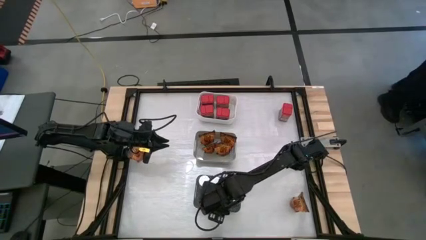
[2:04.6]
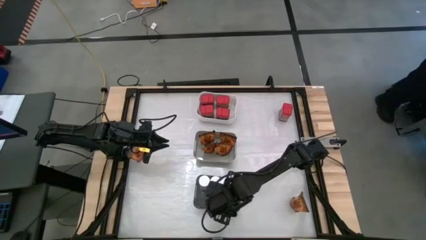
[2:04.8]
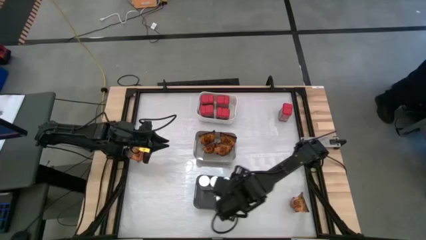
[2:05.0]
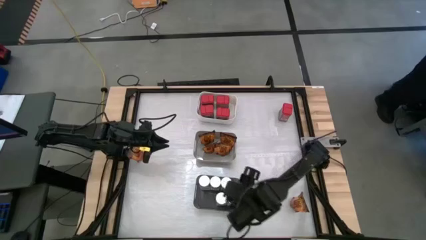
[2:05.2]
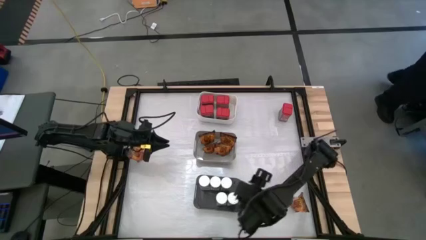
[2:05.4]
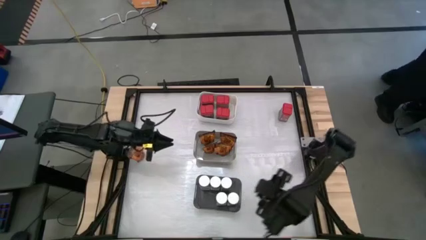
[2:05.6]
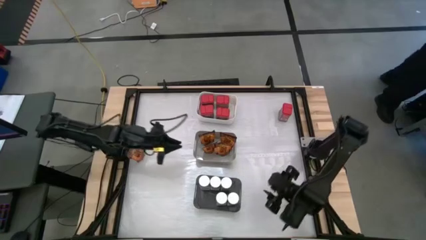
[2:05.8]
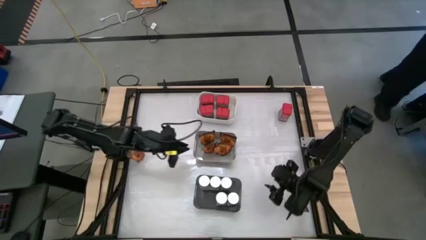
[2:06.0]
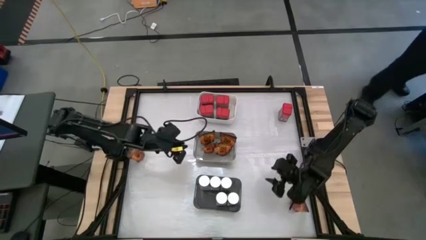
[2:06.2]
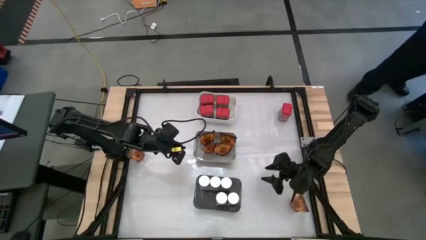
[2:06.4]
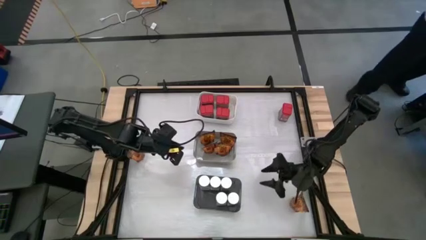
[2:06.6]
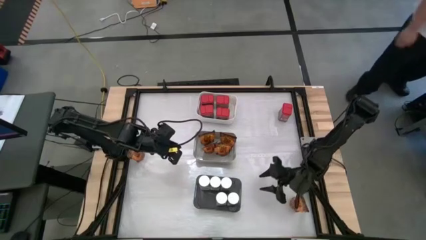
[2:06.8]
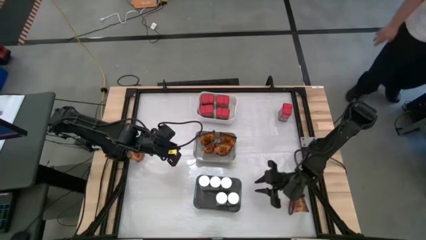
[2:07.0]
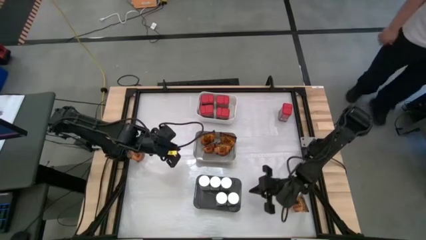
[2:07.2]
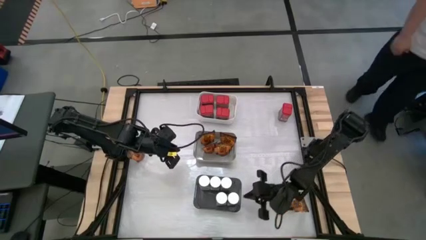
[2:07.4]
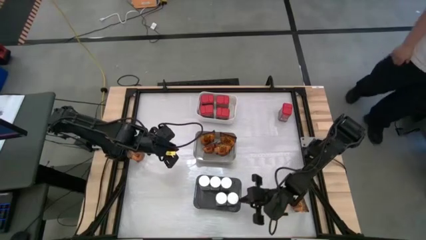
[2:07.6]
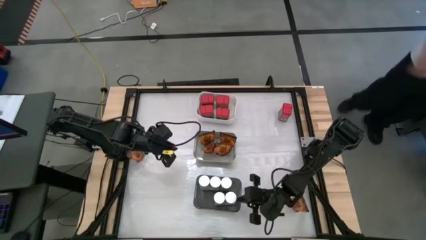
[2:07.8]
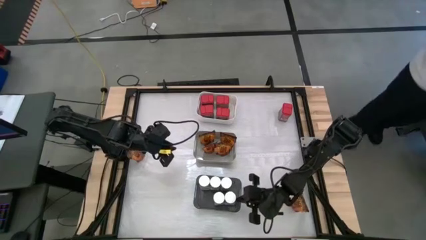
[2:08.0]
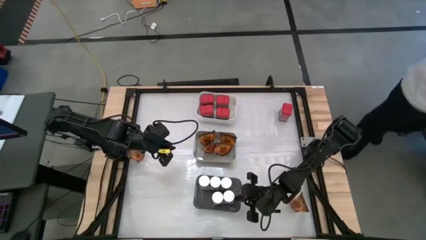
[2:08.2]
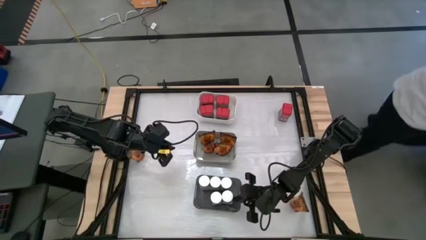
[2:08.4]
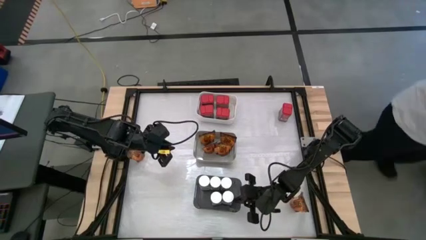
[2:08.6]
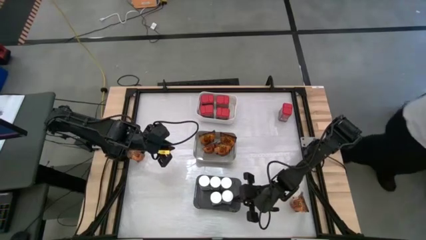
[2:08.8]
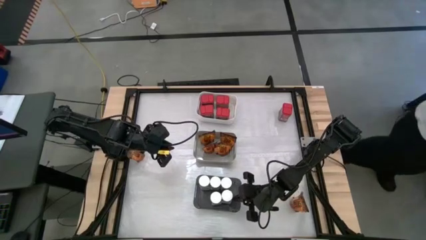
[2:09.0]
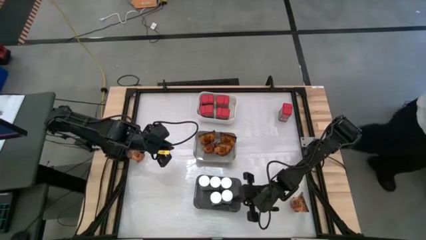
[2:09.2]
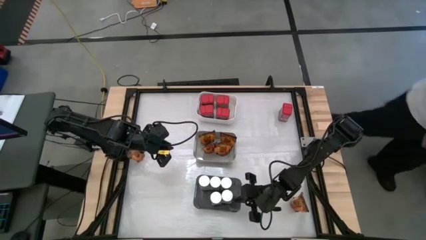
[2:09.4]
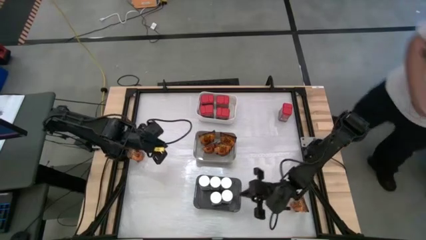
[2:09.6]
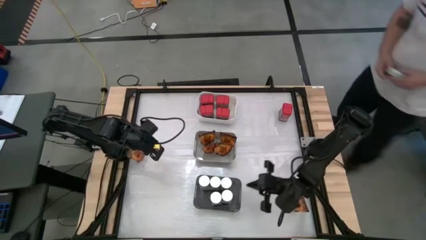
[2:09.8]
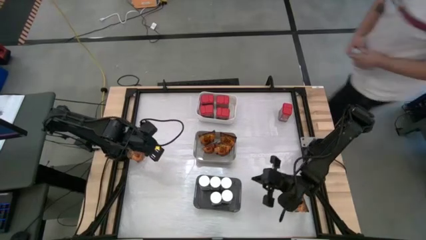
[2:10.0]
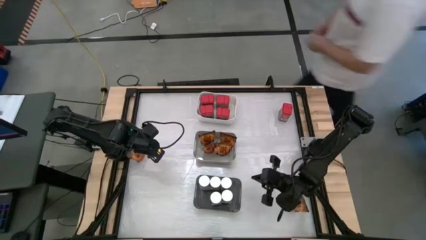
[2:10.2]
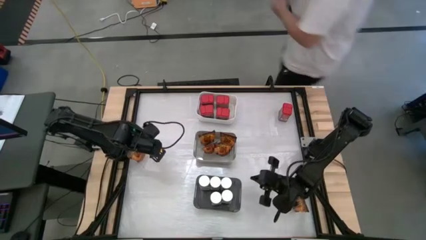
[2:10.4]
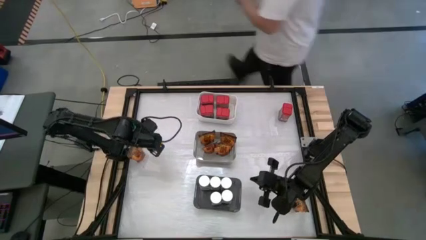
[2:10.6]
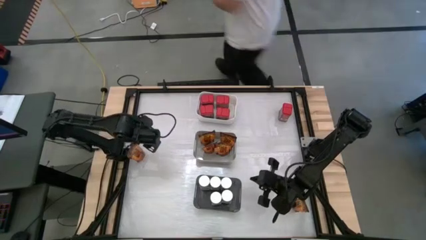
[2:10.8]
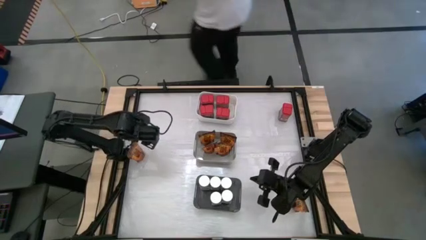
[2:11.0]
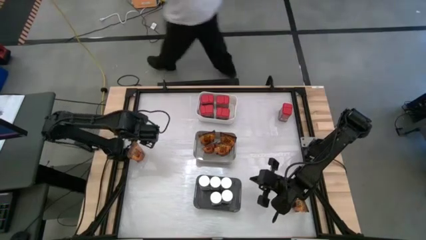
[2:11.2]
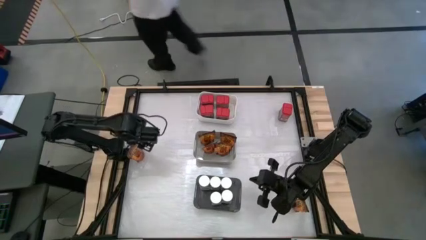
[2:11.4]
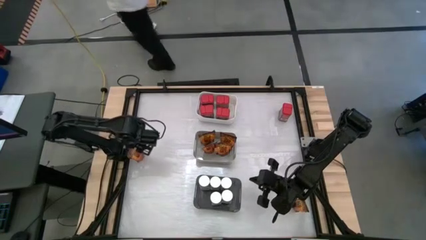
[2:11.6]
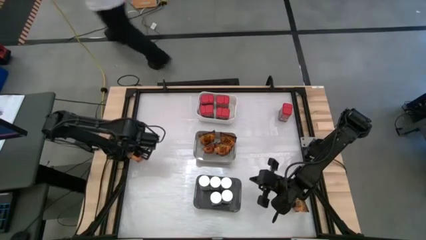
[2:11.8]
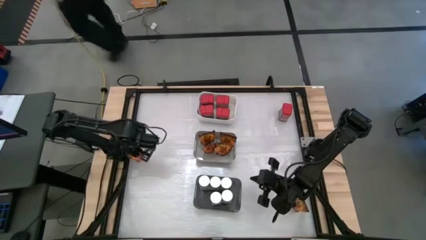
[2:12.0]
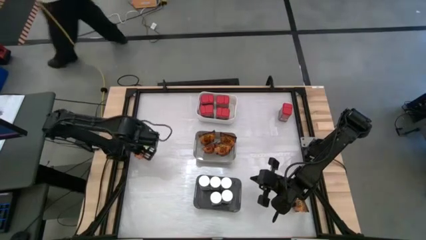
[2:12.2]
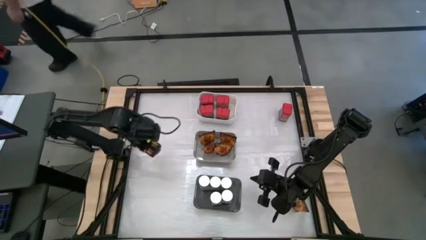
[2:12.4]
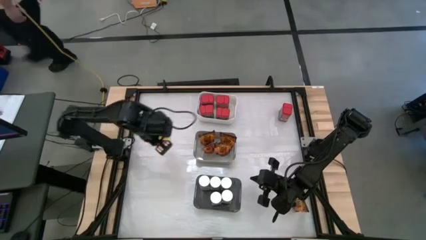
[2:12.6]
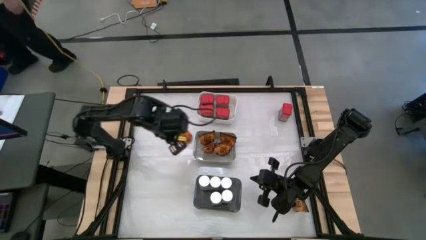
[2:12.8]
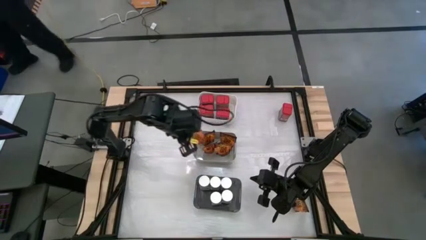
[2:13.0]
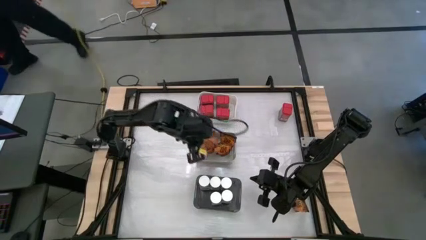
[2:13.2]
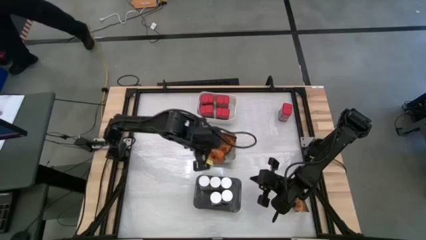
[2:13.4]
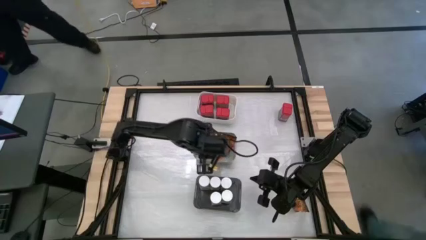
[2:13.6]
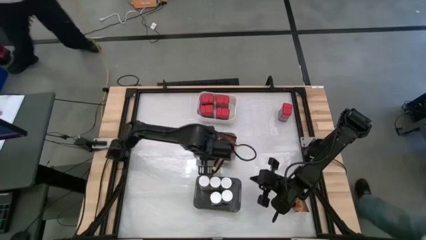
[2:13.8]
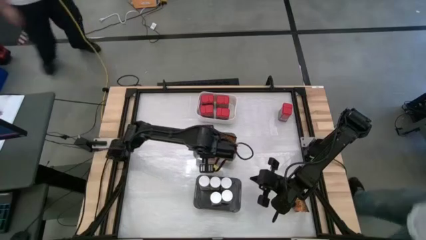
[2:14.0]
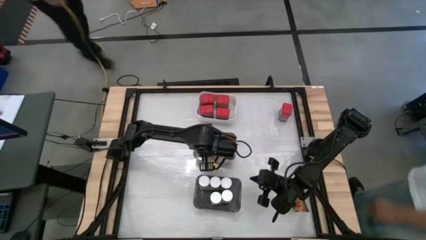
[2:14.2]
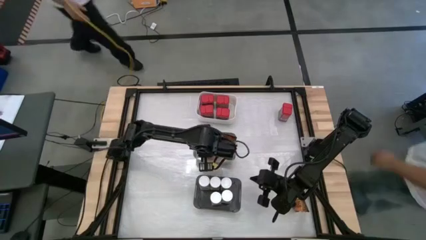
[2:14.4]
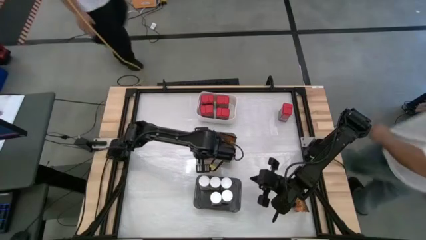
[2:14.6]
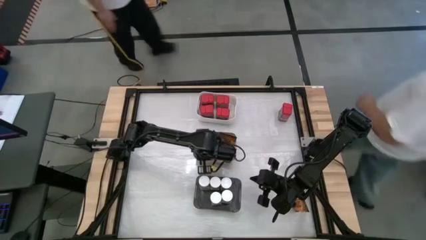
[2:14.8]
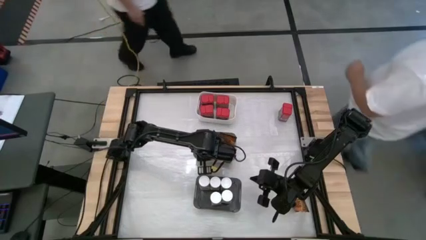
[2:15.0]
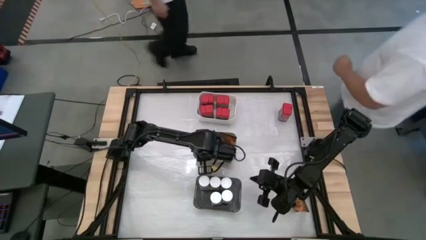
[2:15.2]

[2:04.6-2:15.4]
Task: Sort spices by type
Put the orange seasoning bag into the gray bin

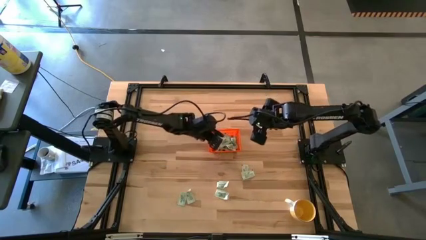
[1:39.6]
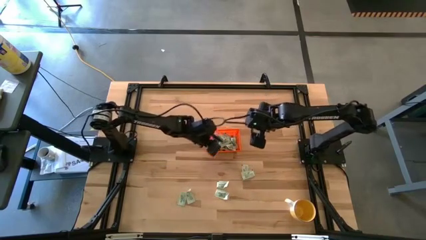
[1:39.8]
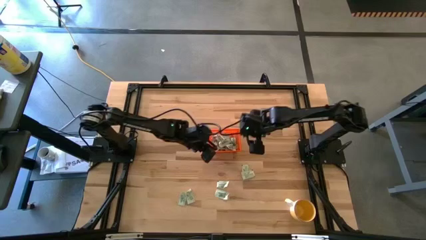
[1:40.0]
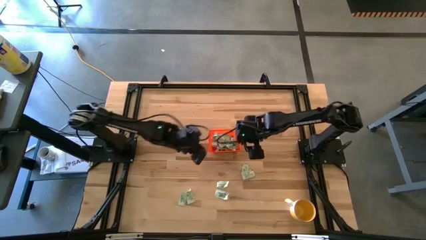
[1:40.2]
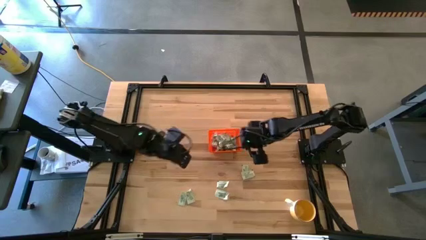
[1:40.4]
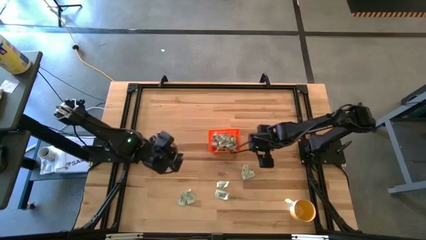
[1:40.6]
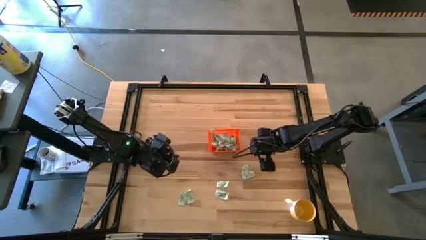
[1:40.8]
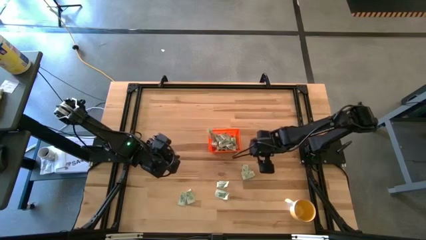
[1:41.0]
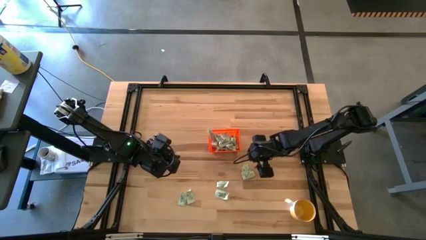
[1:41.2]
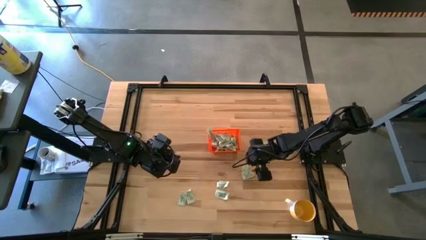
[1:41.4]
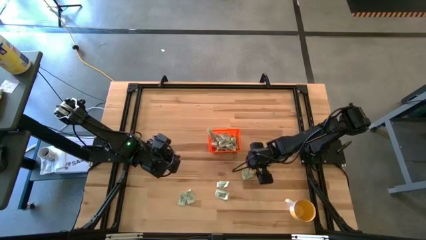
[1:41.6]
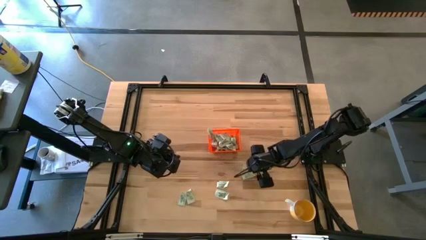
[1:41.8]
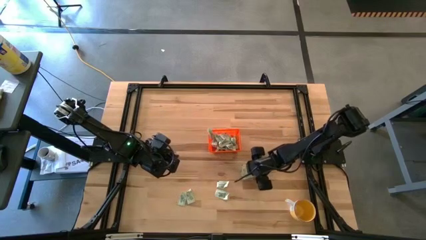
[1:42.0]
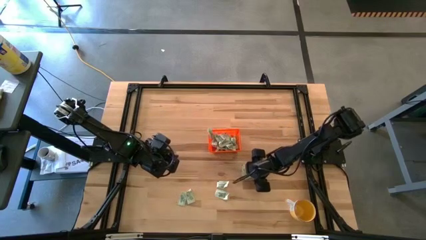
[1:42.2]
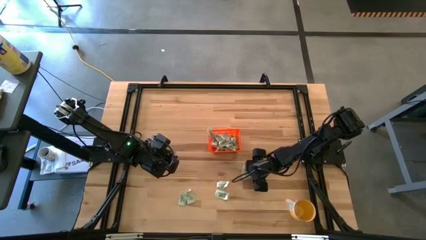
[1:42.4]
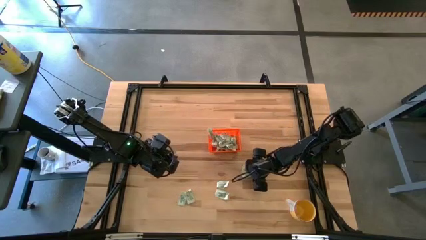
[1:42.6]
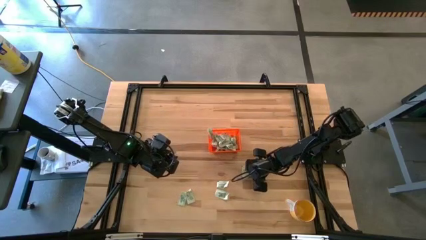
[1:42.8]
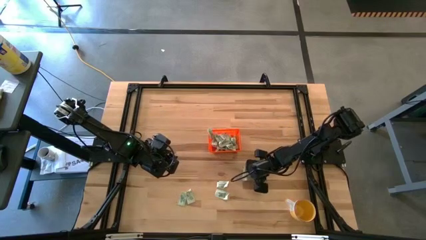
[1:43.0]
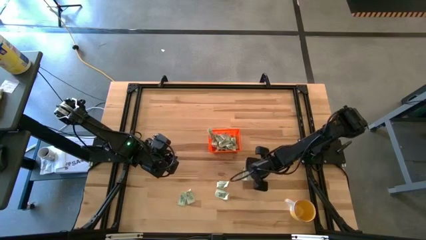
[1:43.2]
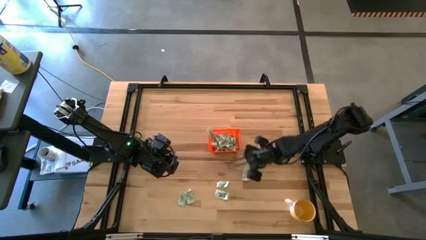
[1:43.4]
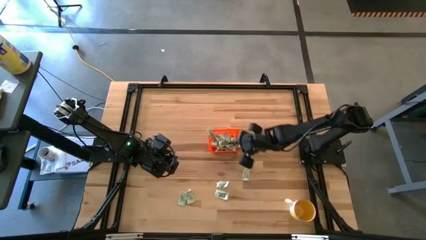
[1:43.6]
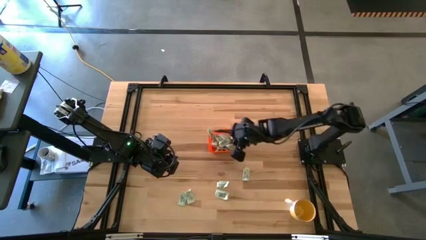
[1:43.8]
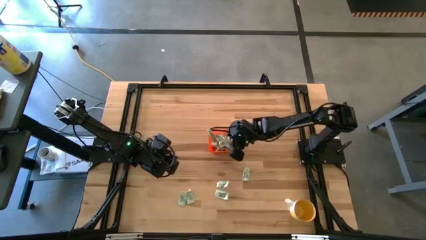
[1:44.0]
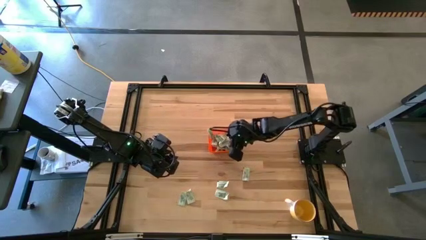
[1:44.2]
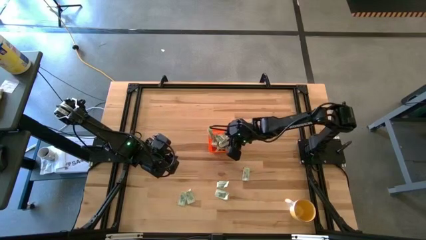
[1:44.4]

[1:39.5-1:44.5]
Task: Pick and place Stevia / Truvia into bins
Put the light green stevia packet into the orange basket

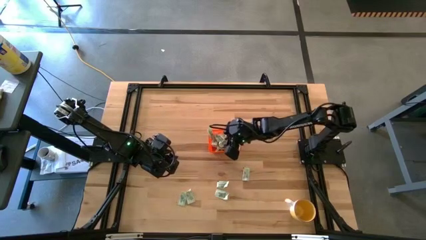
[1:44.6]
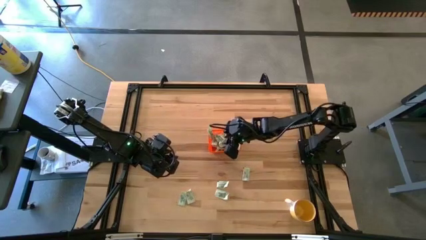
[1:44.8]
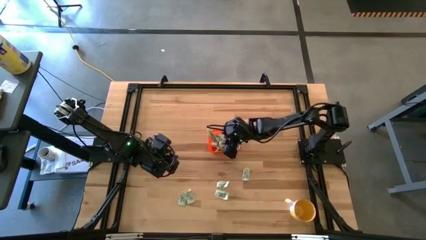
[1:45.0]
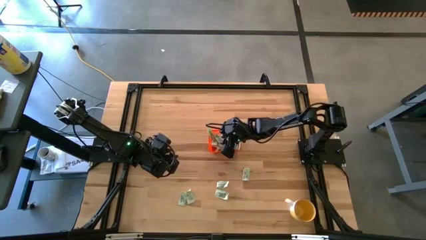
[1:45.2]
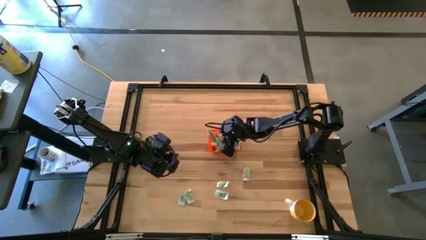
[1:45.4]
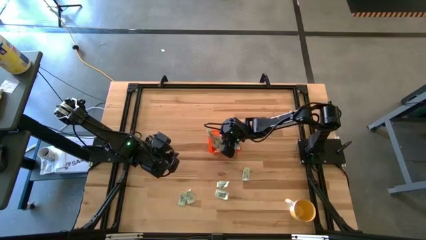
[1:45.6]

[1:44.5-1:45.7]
Adjust the stevia packets in the orange bin
